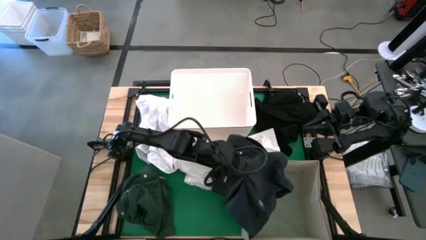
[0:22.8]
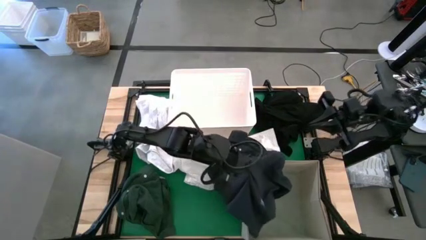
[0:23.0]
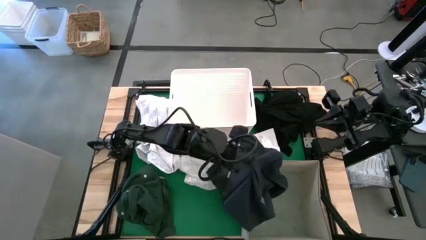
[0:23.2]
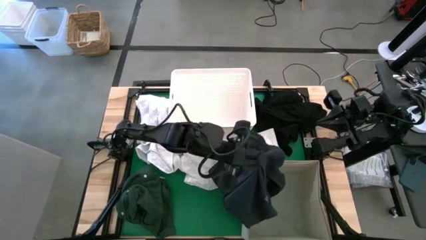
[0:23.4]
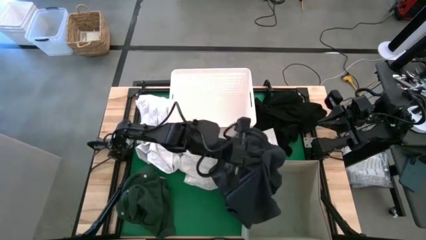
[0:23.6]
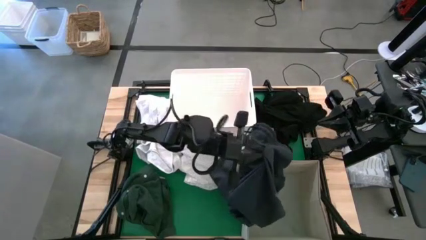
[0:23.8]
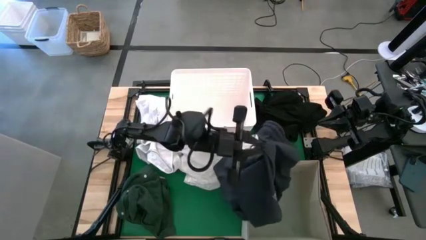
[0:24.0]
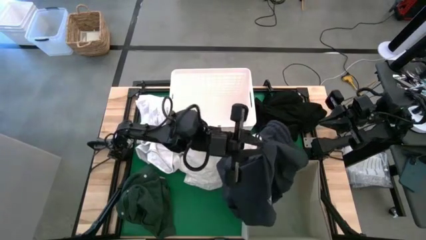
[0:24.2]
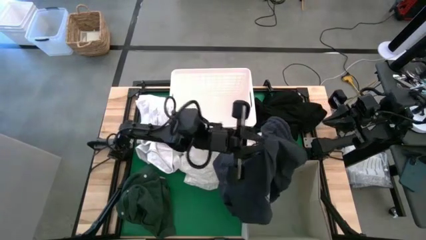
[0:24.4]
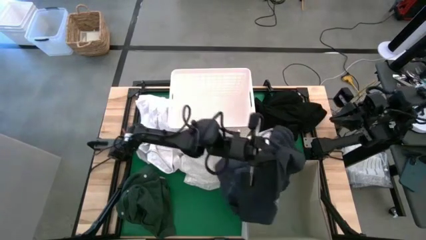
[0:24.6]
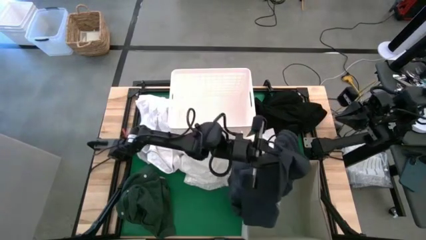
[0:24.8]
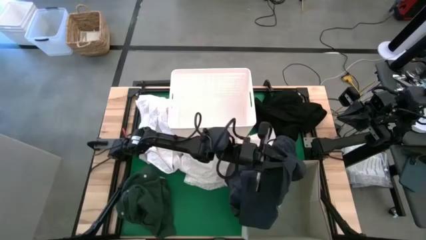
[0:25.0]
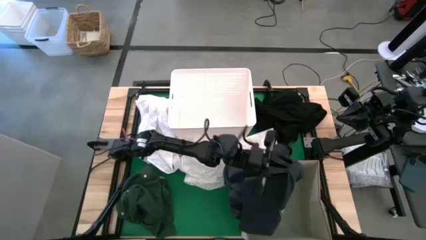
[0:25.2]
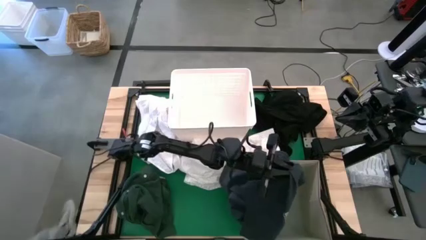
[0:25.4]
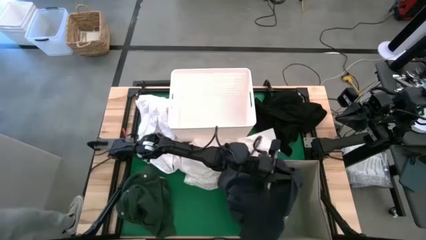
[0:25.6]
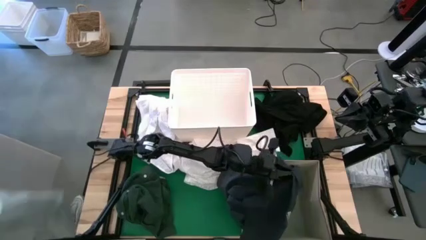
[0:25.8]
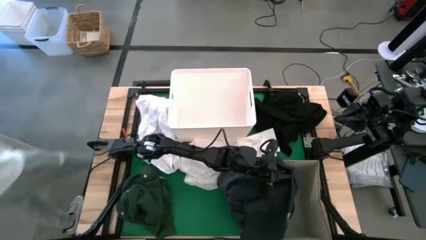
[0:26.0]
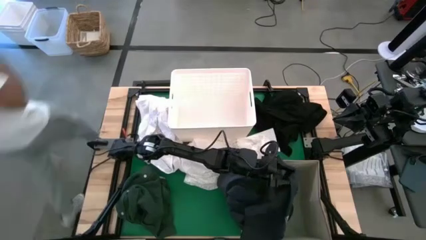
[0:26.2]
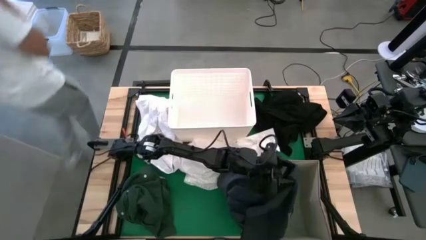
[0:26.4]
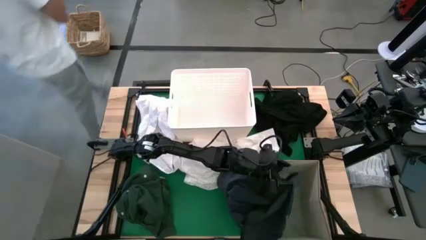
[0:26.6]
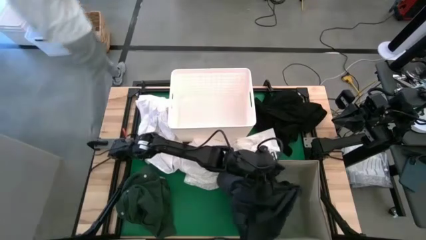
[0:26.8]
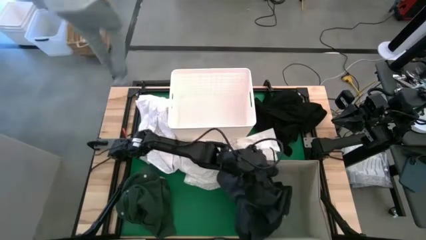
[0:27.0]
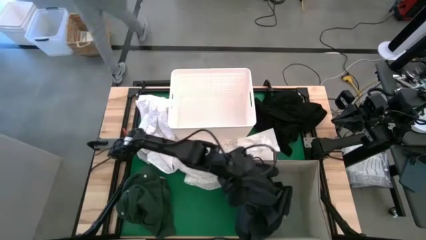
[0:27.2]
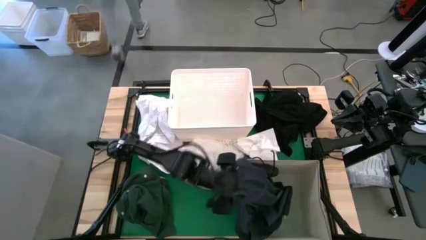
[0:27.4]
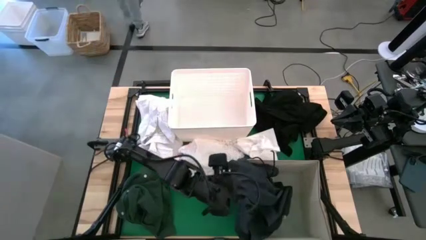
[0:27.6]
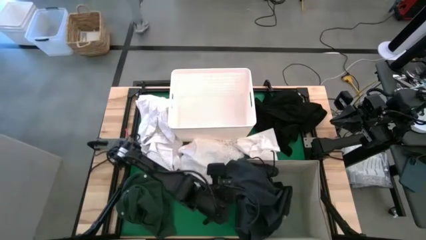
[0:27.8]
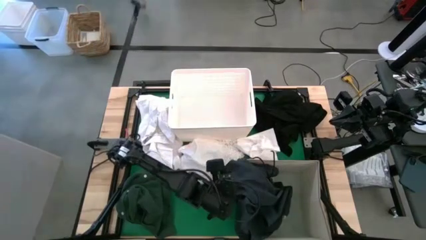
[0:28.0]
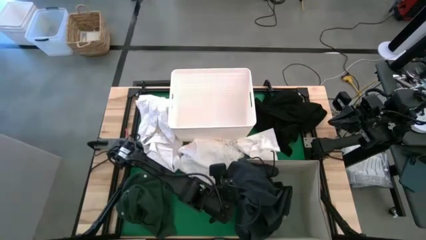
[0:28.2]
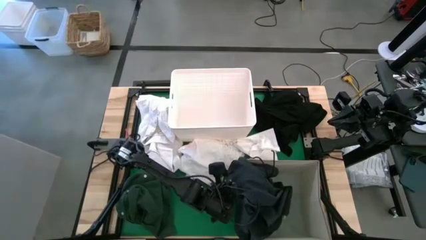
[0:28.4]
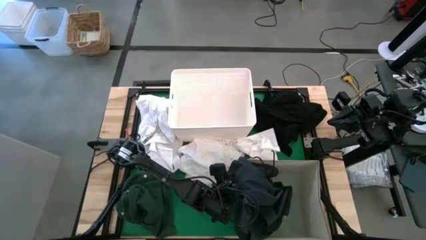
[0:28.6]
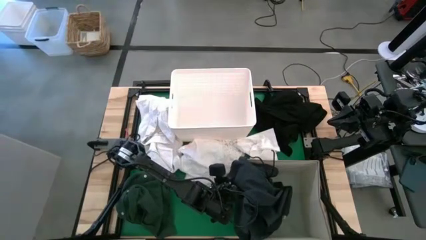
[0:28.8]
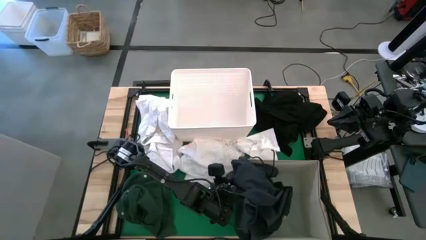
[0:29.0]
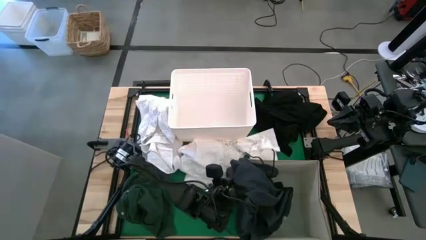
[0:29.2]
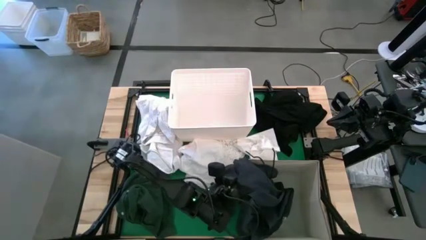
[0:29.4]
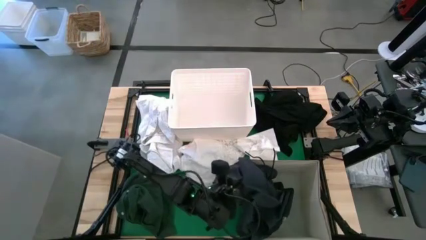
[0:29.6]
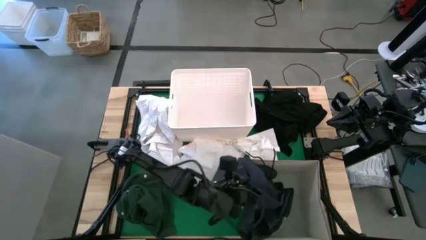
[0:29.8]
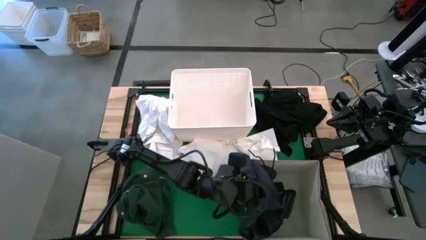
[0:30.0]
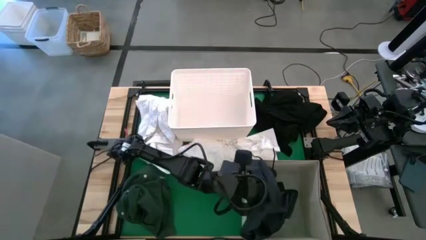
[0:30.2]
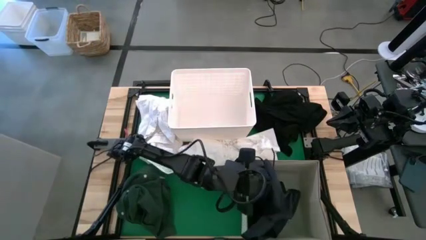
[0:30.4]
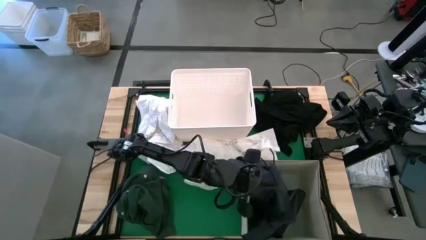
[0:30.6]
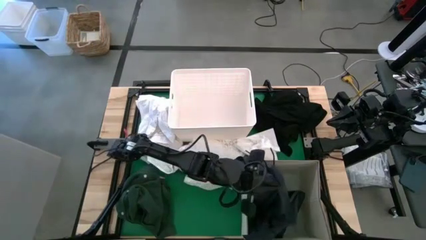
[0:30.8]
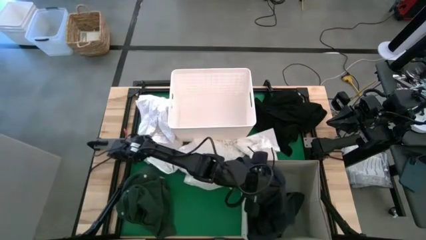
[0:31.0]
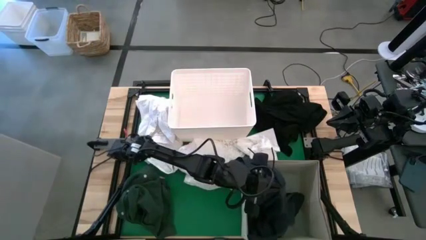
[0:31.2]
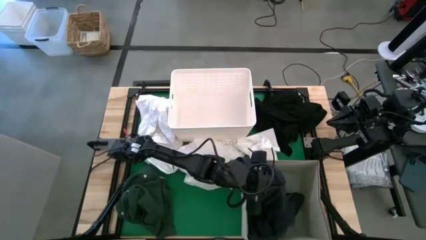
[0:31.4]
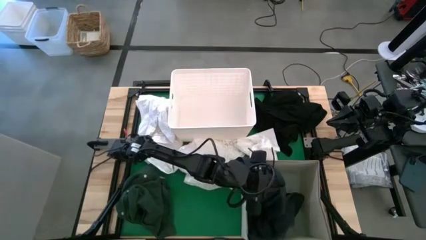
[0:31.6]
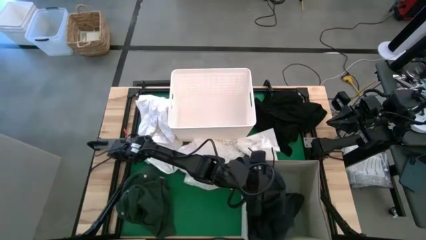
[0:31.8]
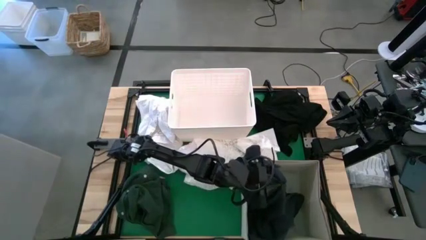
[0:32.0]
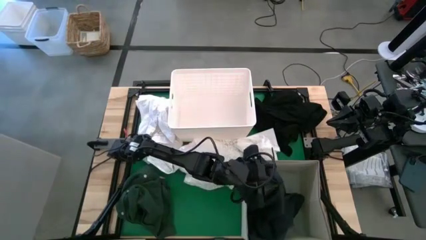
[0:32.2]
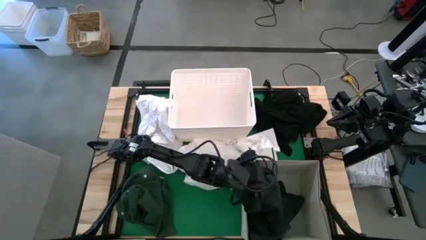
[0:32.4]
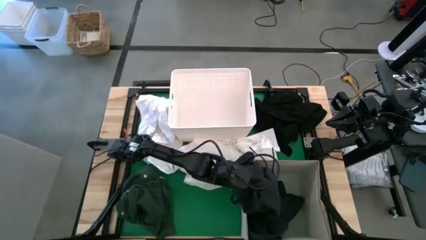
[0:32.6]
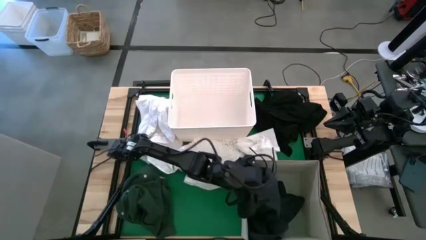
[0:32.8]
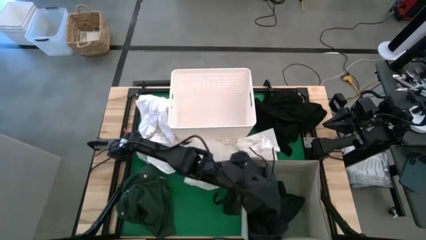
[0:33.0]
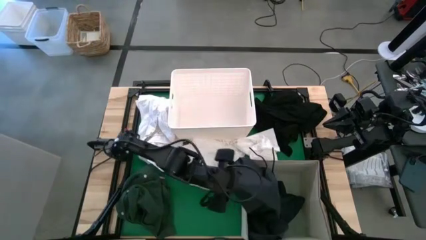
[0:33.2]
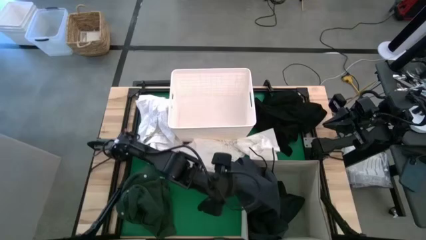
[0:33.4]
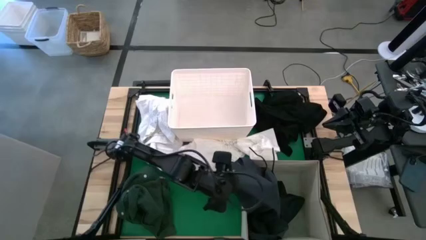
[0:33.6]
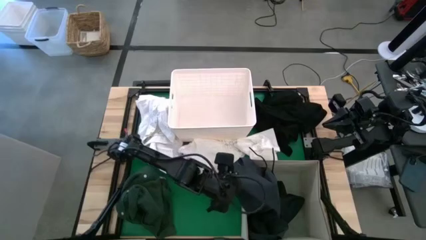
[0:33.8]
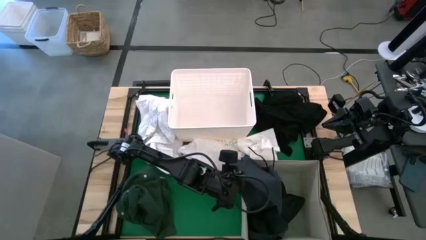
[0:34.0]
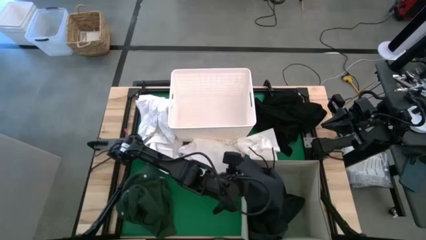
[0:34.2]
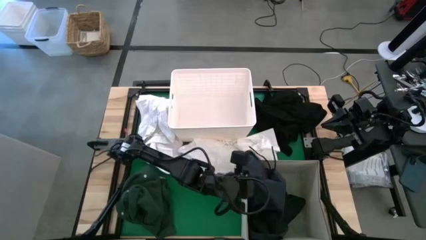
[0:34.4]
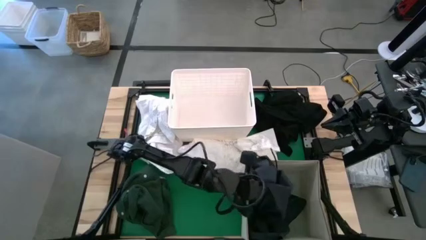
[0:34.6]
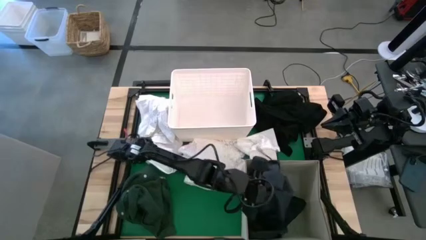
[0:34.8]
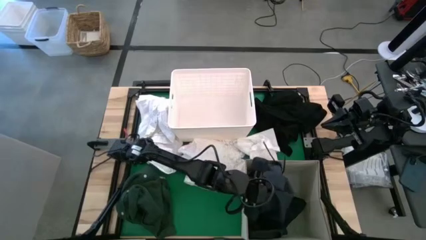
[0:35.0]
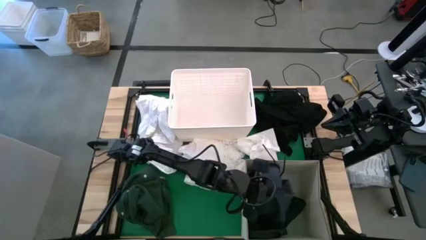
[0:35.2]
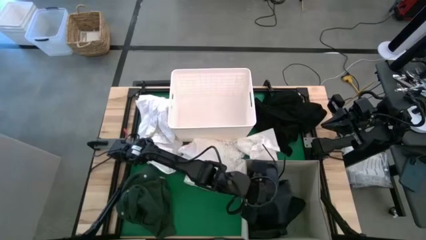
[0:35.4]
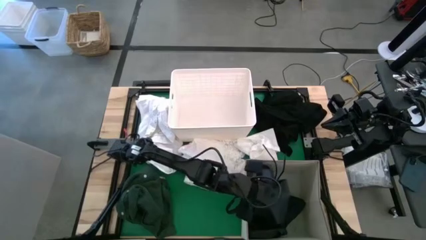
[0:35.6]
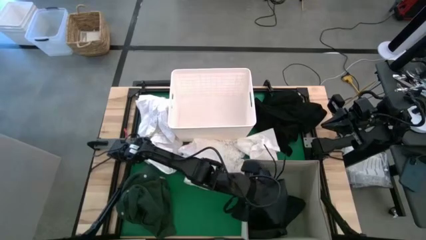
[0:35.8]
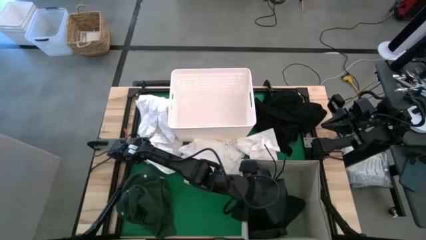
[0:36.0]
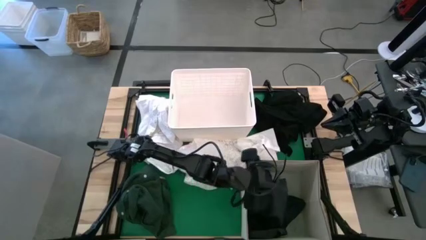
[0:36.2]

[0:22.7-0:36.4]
Put the black shorts into the white fabric storage bin
